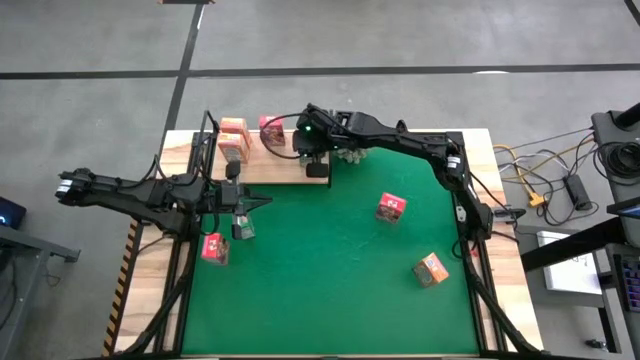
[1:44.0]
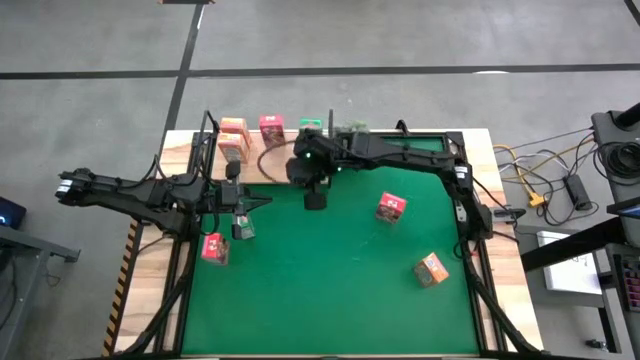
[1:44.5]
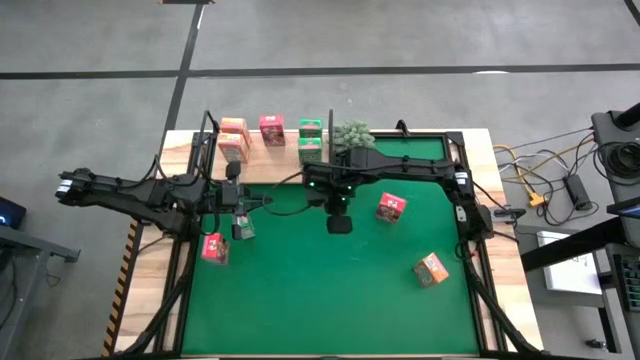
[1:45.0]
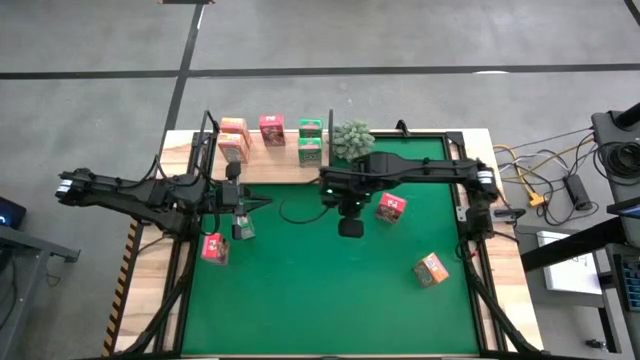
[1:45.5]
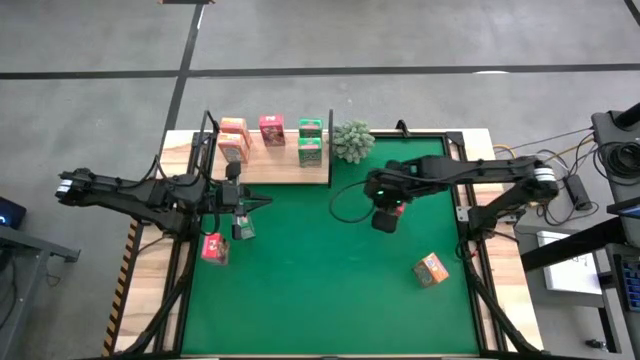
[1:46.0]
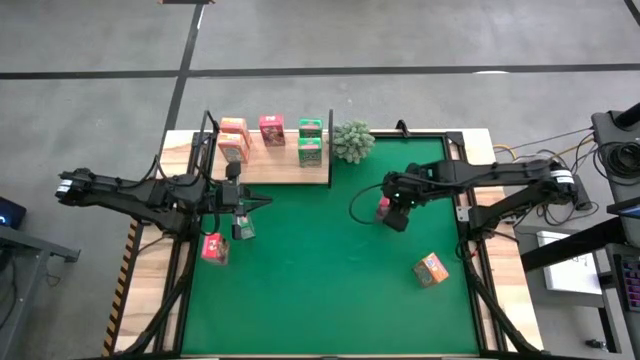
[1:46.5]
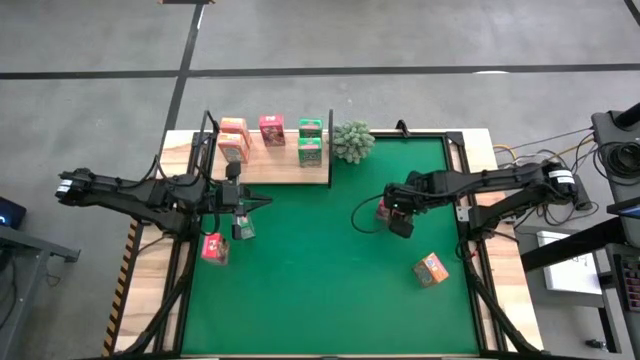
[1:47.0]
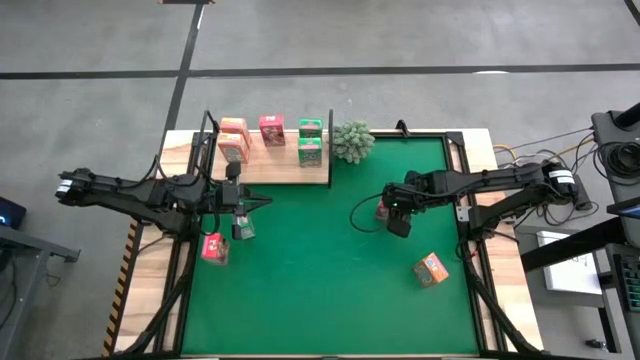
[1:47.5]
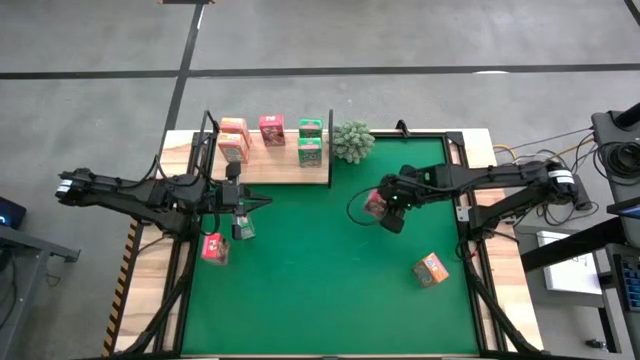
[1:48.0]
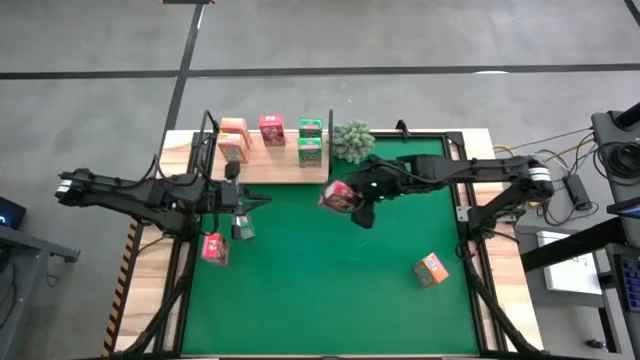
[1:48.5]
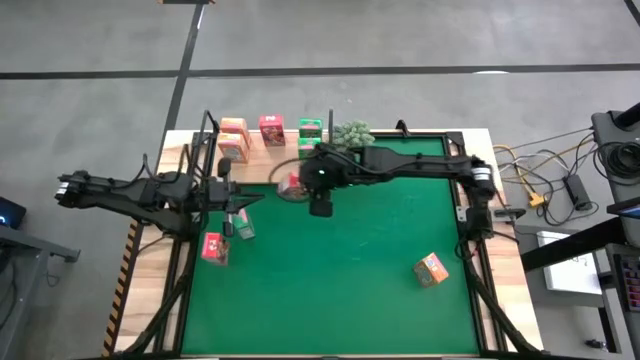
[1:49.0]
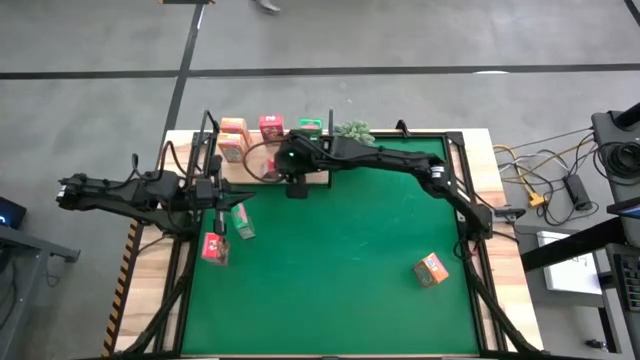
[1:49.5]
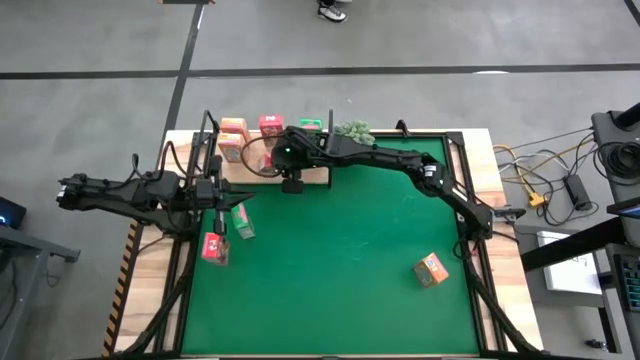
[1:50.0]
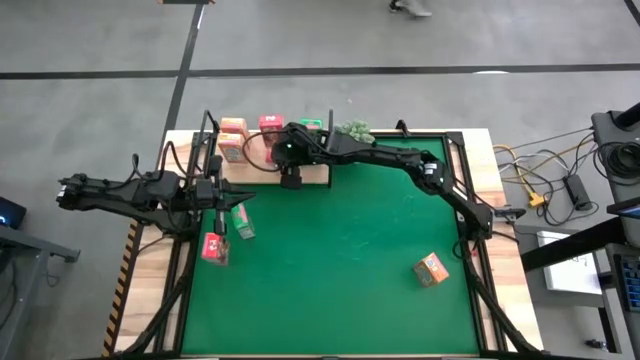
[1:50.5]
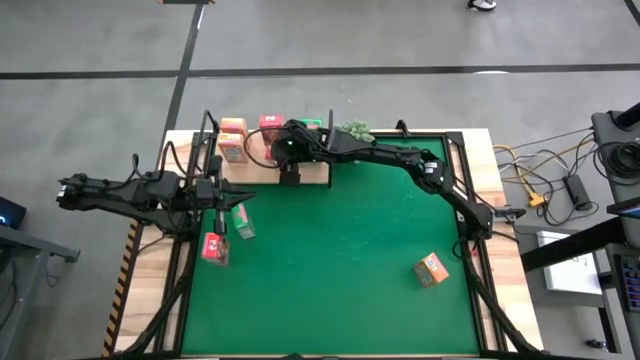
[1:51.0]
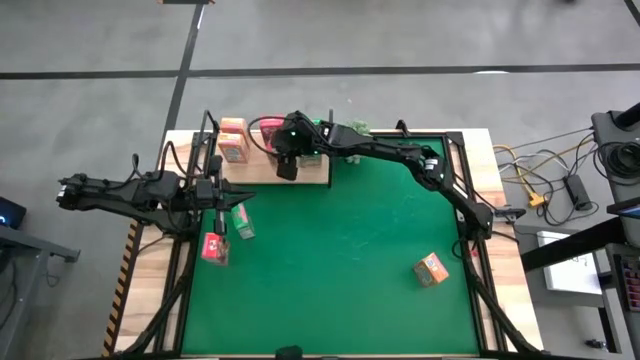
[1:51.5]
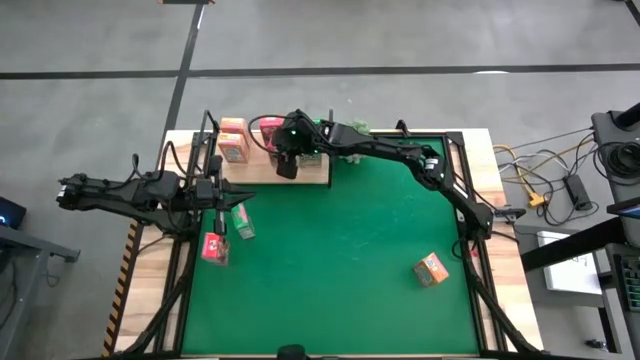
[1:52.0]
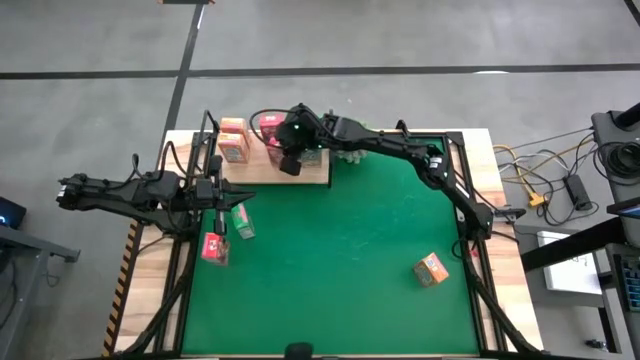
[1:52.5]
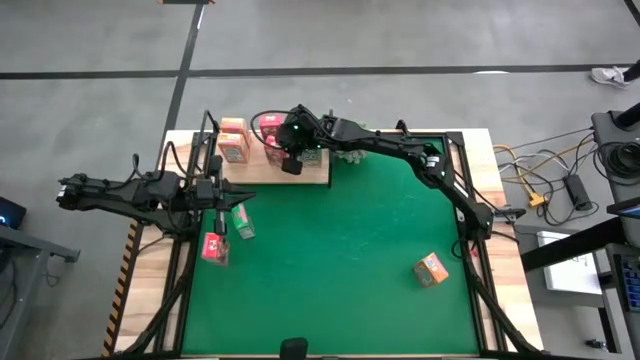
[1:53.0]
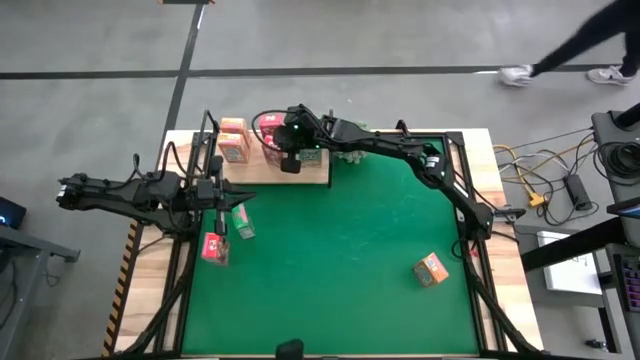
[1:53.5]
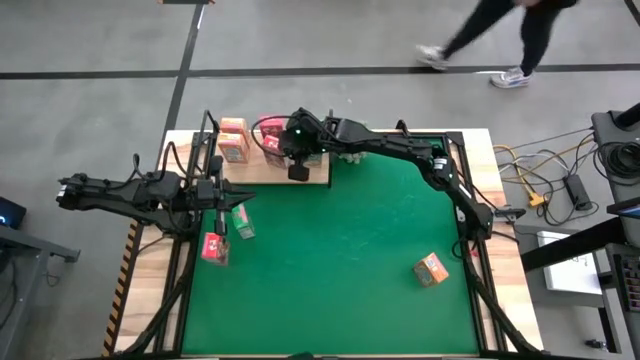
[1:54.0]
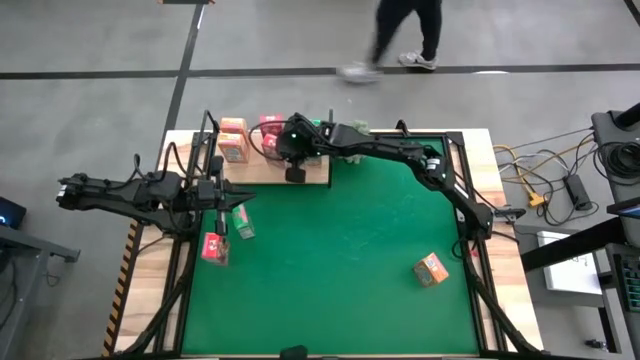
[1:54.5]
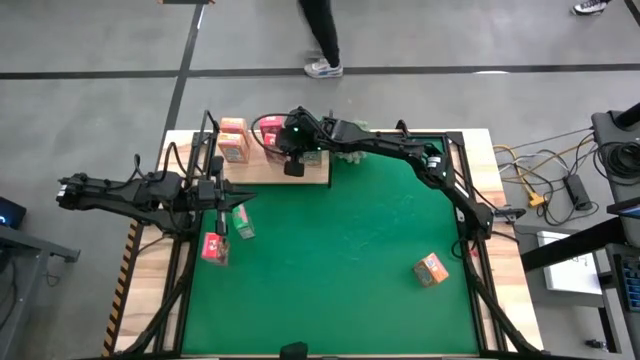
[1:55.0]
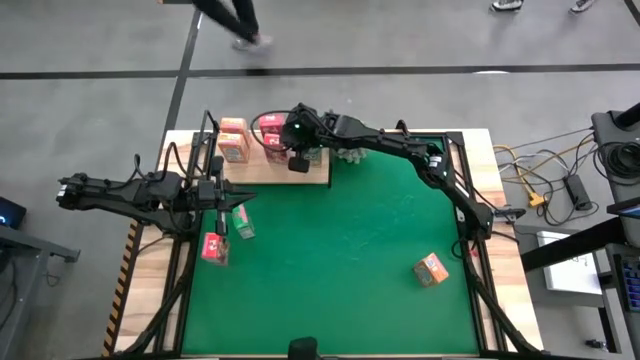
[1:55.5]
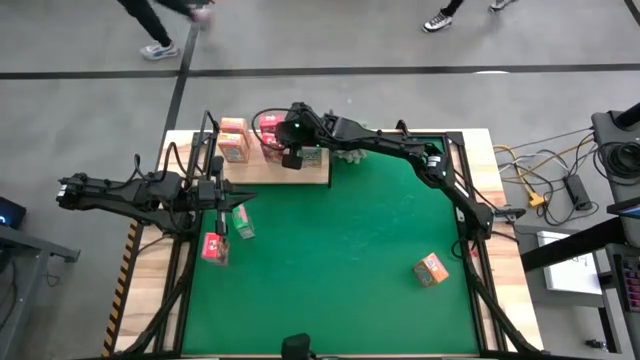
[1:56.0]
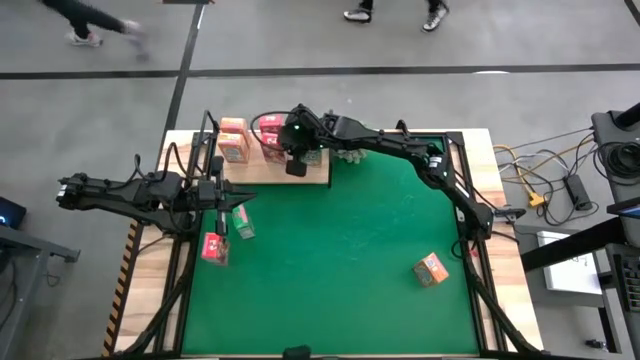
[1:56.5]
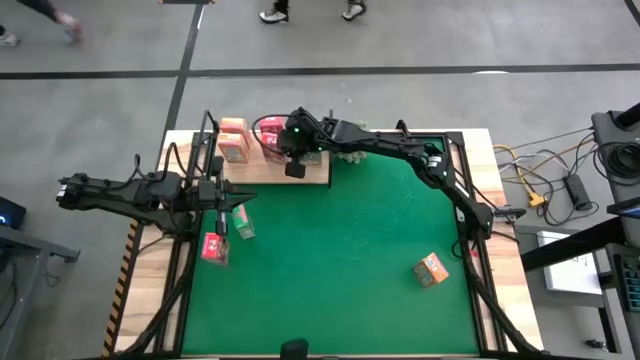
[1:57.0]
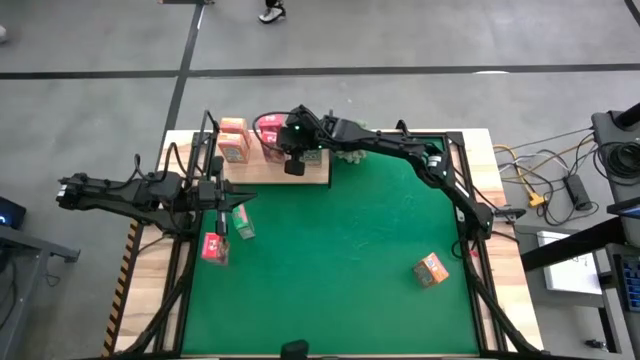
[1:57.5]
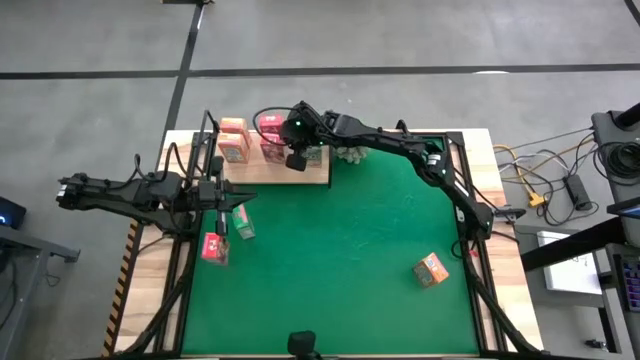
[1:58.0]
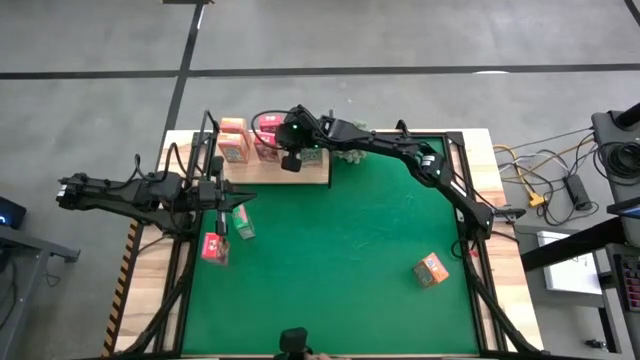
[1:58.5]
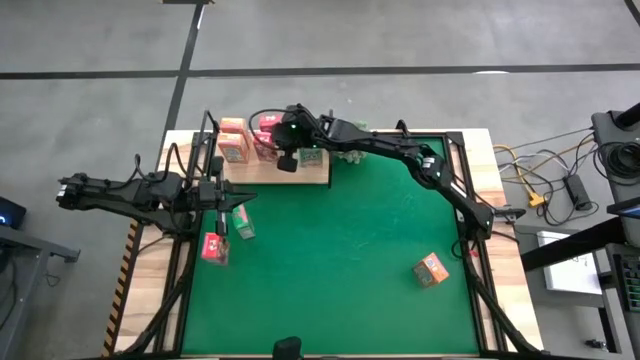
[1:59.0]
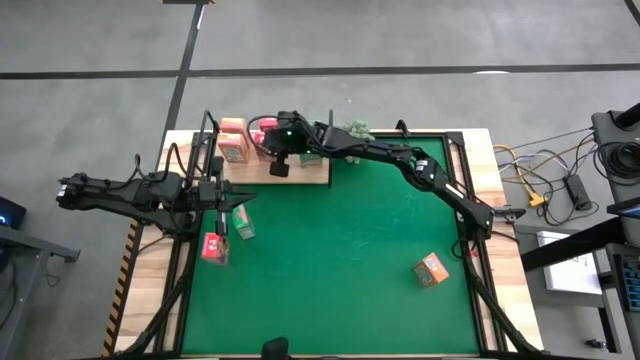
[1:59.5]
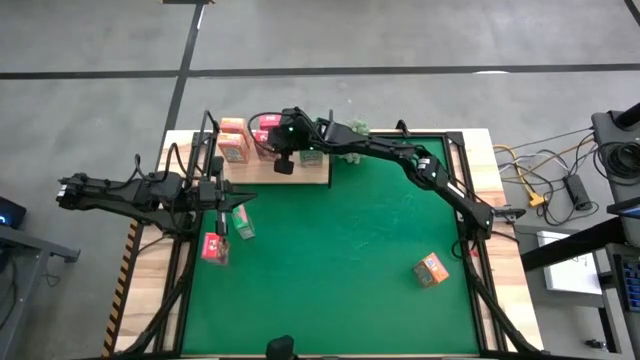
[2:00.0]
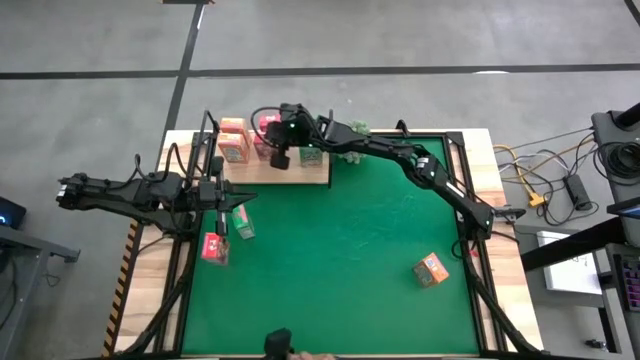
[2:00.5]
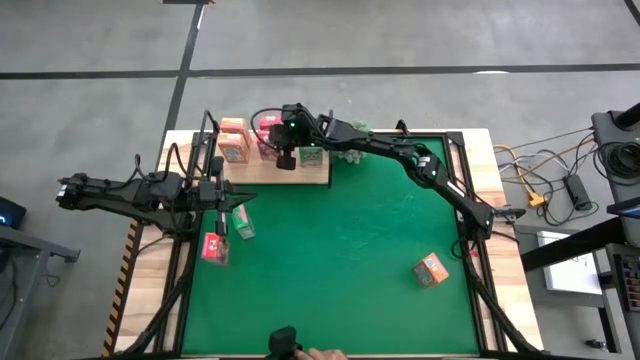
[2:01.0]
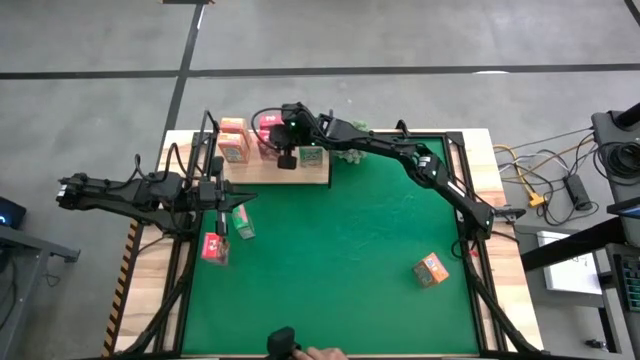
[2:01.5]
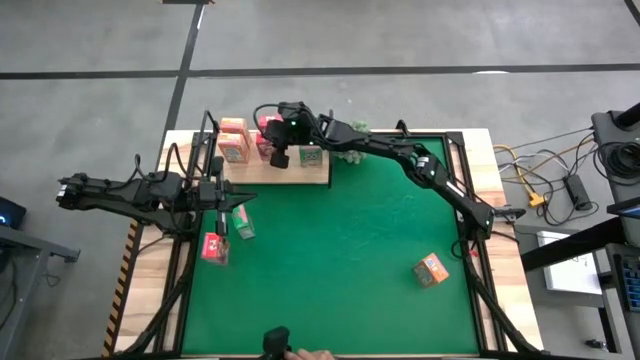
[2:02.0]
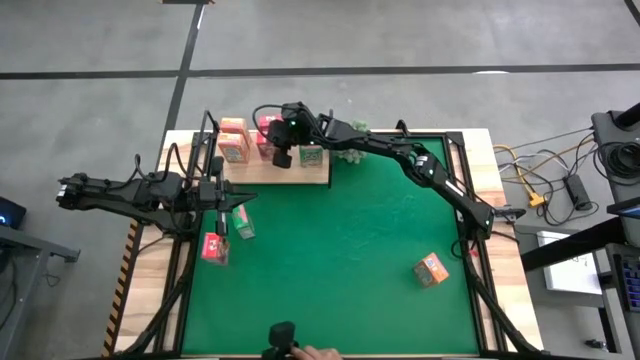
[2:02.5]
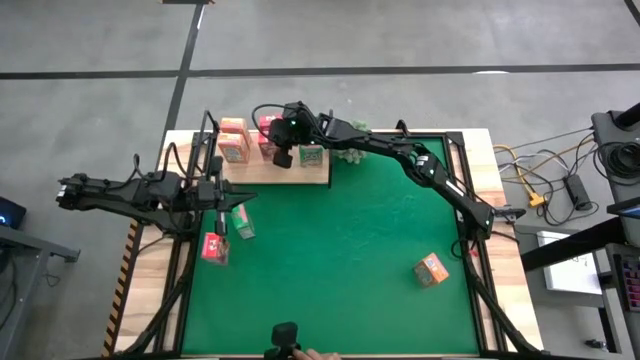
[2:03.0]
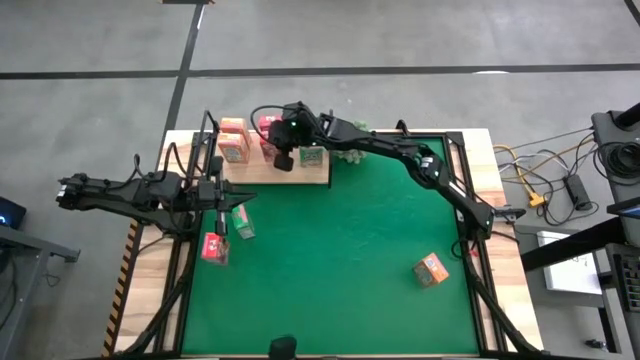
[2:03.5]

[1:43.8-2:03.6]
Task: Stack cereal on shelf
Put the top red cereal box on the shelf aligned with the other red cereal box
